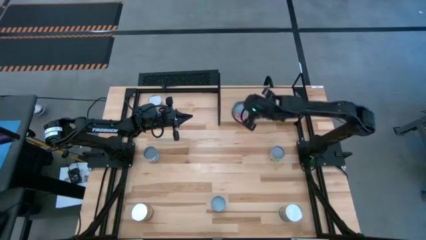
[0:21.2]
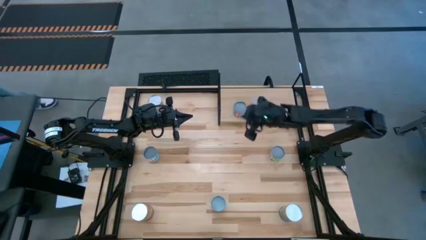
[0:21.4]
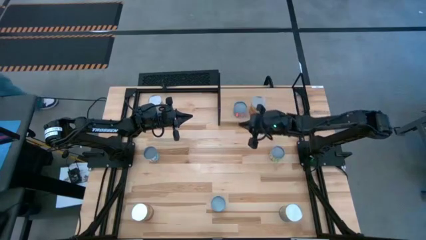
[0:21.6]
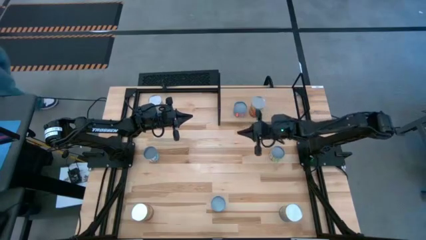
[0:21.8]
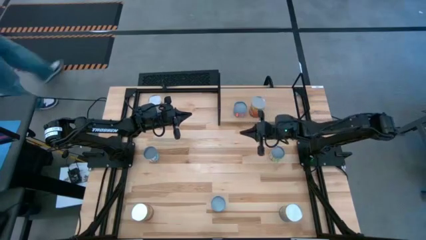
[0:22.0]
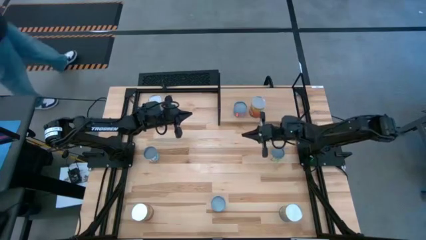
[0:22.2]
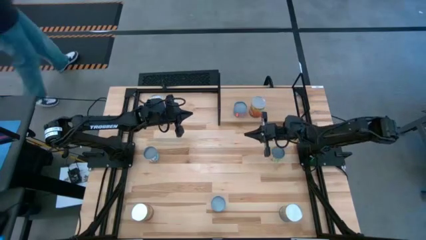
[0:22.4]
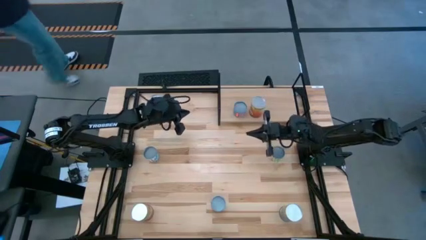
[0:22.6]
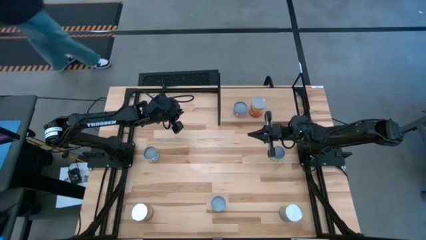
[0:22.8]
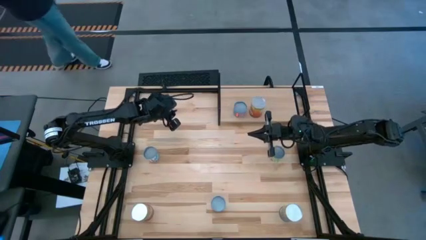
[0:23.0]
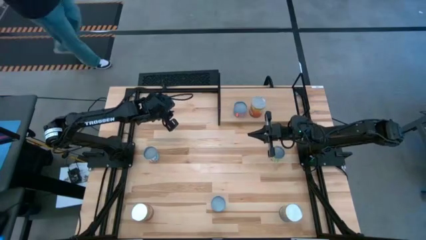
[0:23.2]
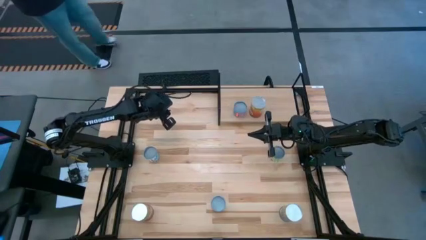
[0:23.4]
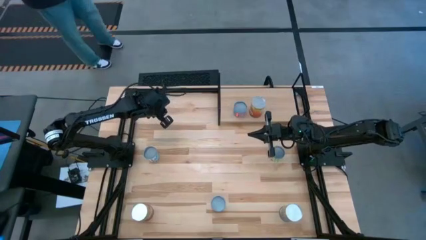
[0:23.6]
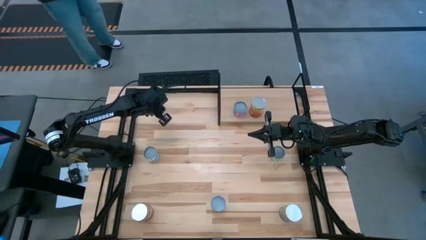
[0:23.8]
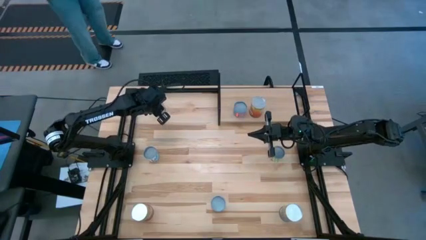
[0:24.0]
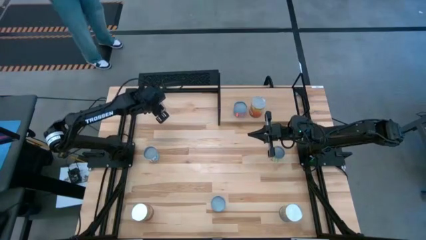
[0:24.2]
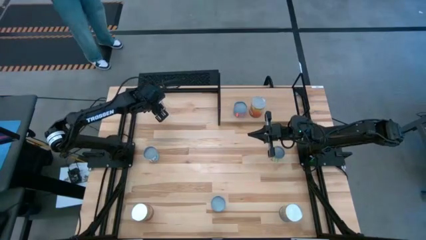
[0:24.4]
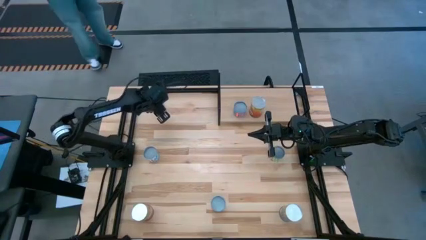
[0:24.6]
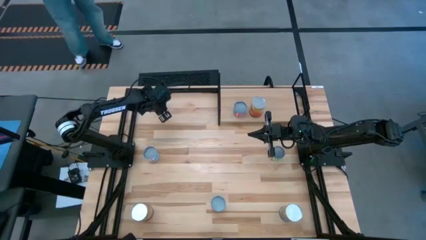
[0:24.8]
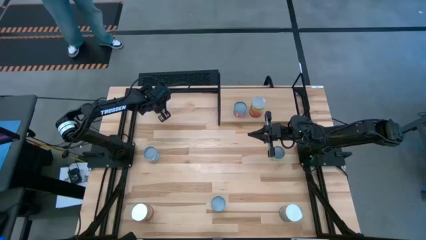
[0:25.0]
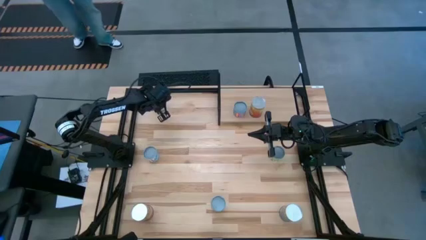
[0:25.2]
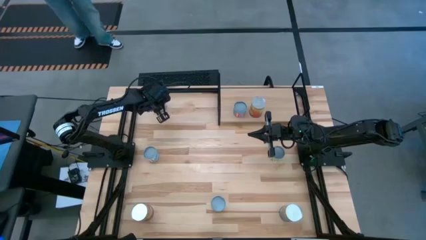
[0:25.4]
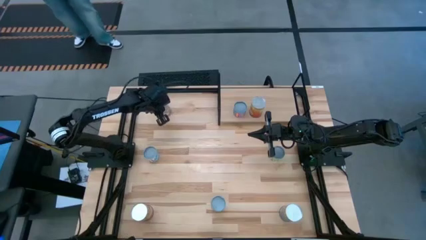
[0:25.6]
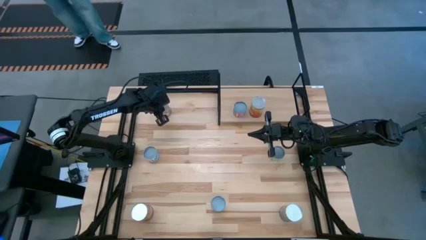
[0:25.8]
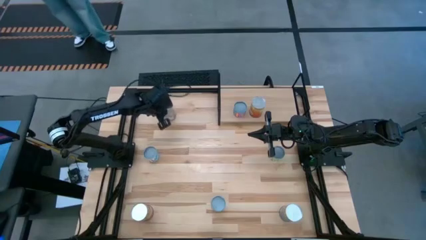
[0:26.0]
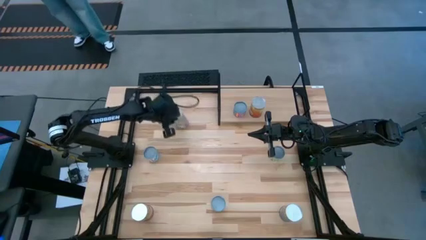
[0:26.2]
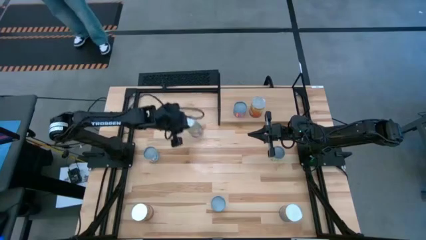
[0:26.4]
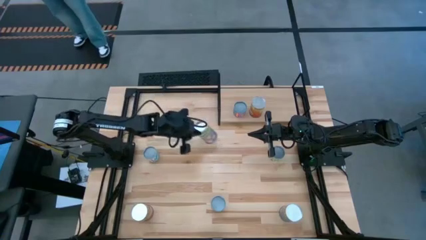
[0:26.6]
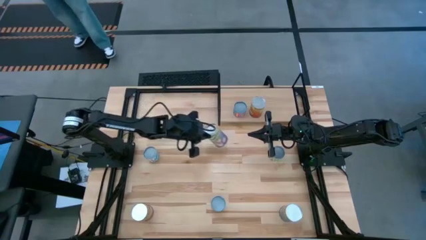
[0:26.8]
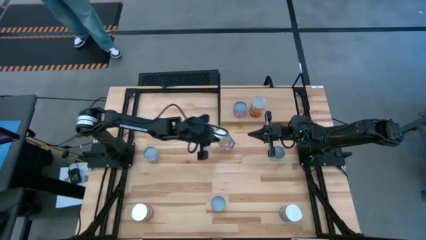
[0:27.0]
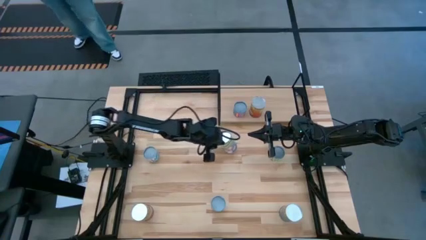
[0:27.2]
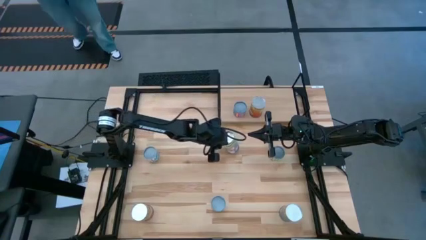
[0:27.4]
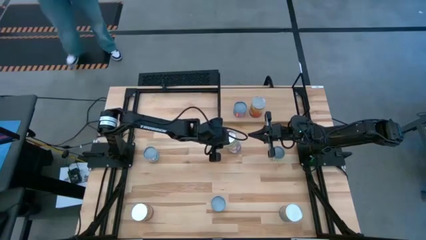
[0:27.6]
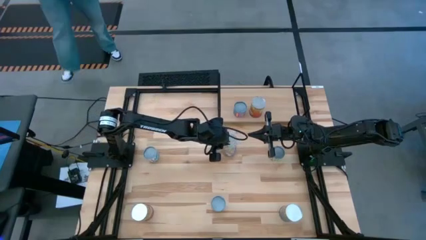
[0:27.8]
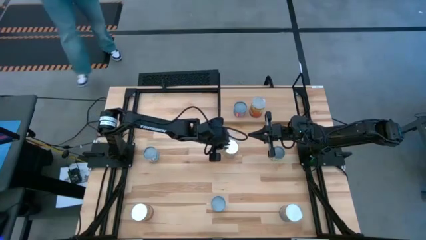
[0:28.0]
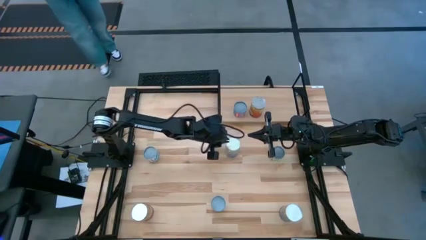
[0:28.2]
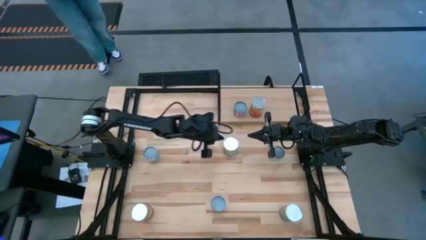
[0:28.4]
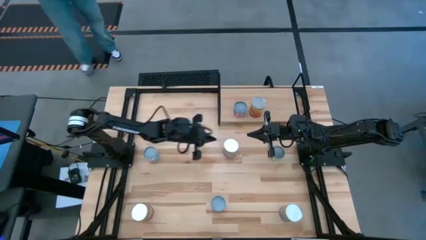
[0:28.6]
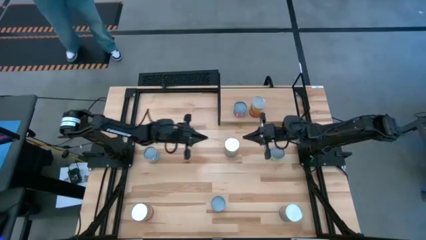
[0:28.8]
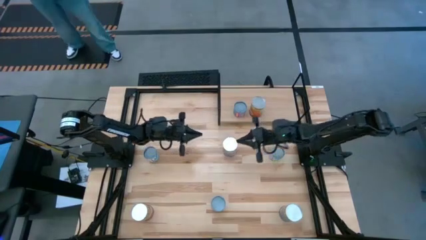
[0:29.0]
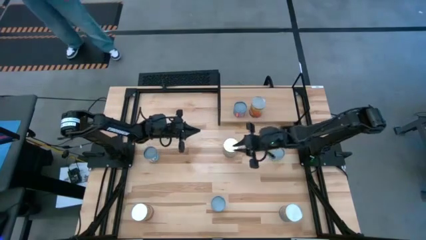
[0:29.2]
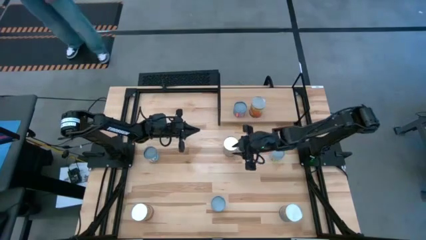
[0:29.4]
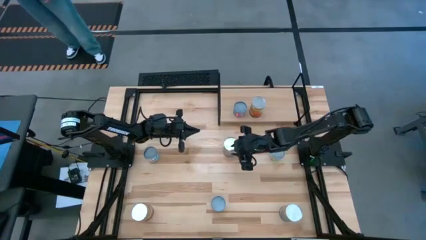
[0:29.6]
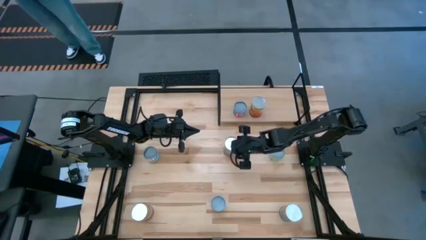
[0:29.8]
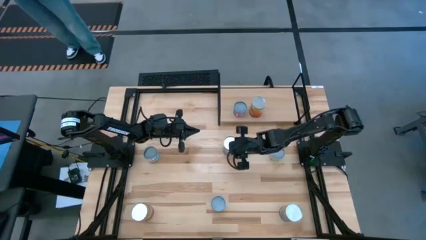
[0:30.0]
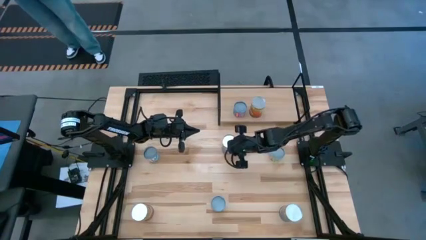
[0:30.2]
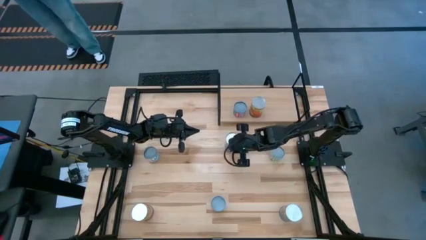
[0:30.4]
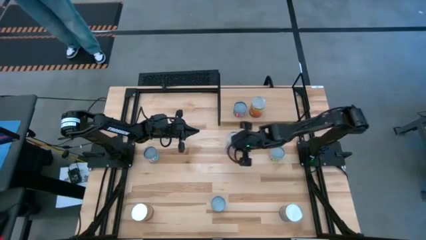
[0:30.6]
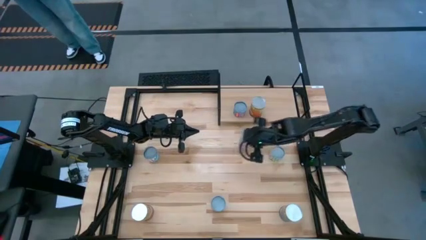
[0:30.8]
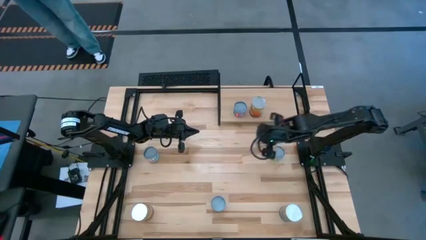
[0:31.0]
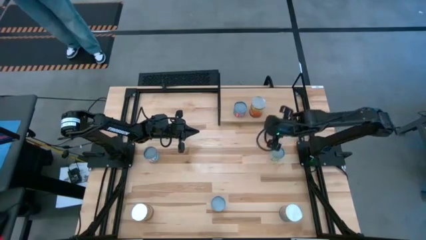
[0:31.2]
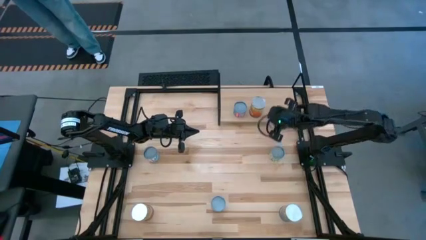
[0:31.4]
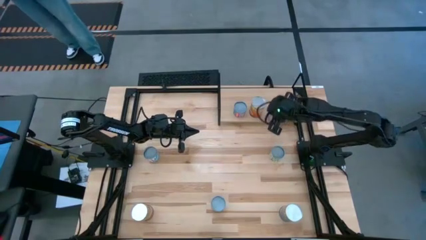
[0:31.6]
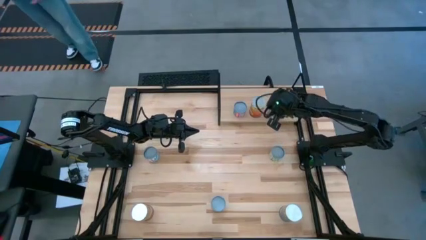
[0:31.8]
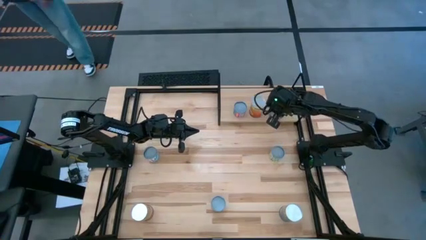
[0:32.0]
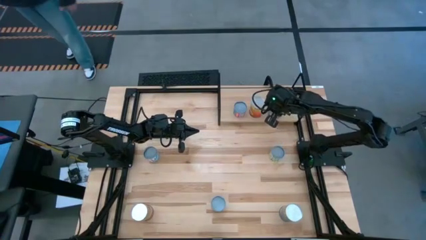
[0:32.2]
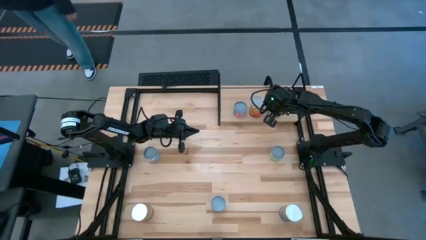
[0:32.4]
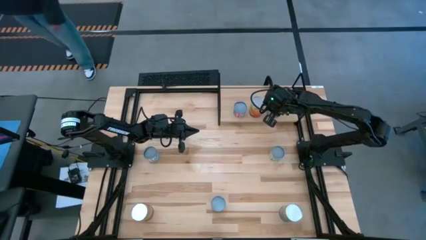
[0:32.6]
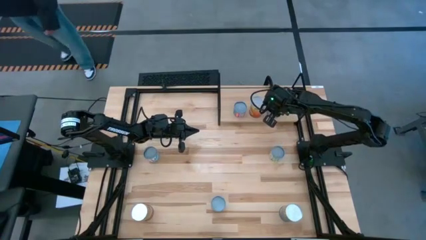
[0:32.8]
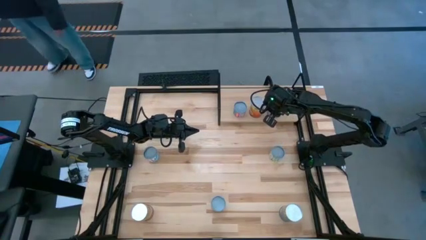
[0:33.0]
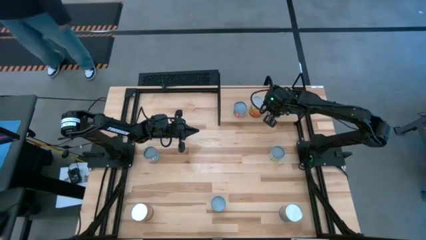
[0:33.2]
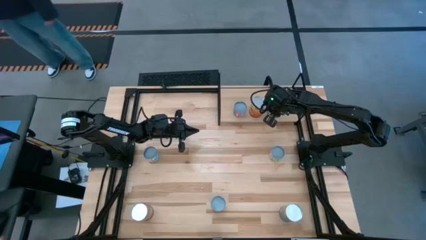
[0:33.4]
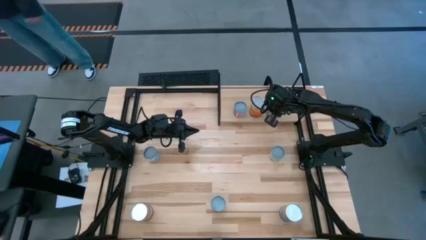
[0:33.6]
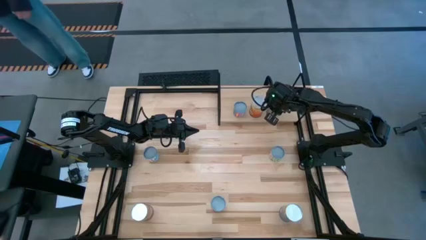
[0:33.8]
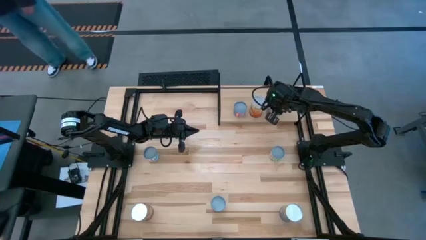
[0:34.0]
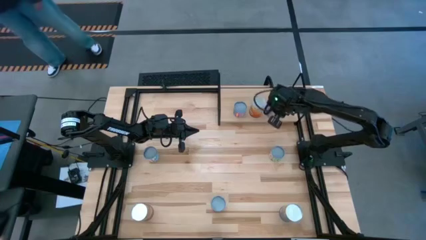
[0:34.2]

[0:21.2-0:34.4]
Task: Pick and place cans onto a shelf
Put the top canned peaches on the shelf

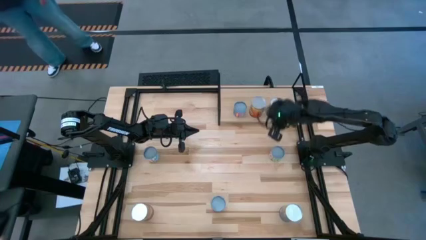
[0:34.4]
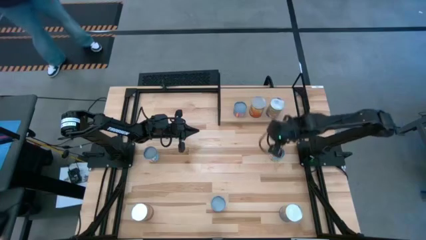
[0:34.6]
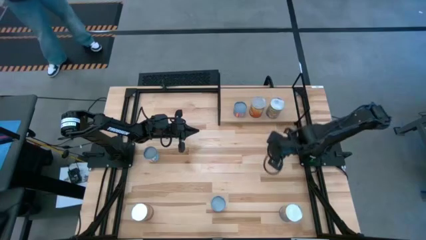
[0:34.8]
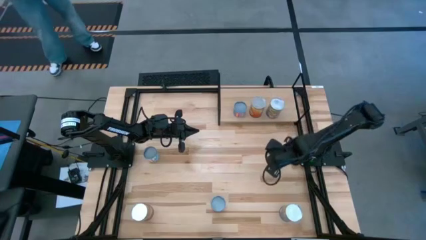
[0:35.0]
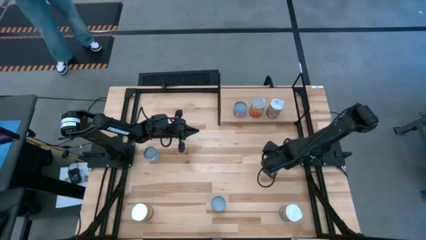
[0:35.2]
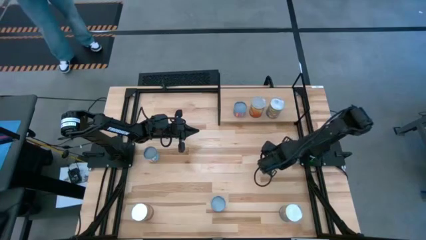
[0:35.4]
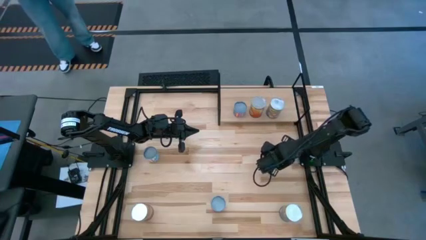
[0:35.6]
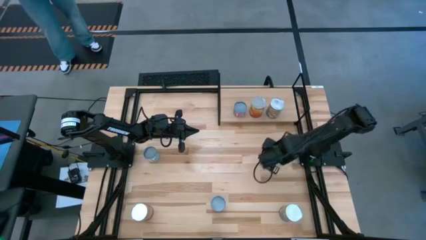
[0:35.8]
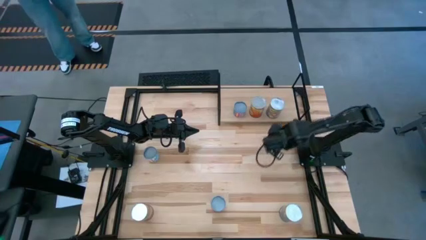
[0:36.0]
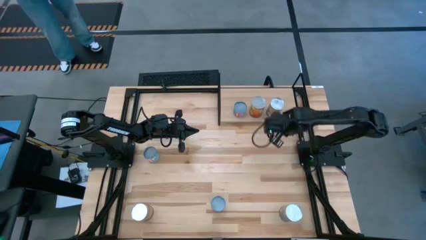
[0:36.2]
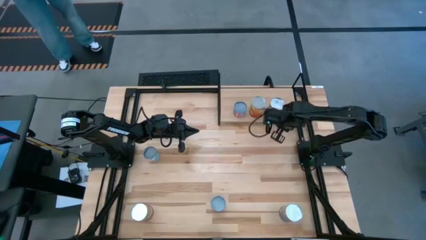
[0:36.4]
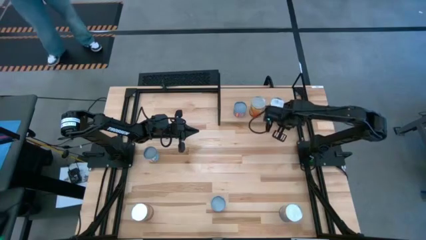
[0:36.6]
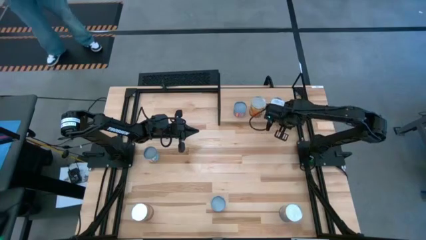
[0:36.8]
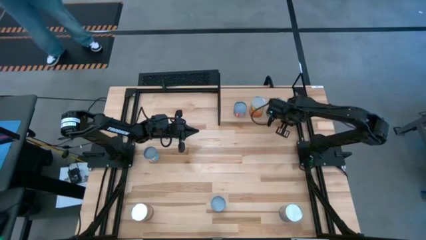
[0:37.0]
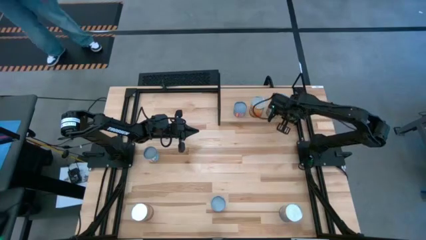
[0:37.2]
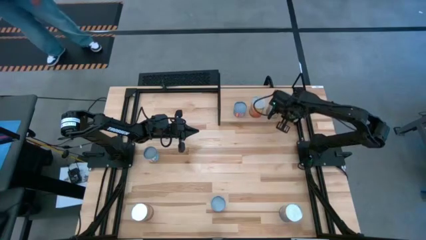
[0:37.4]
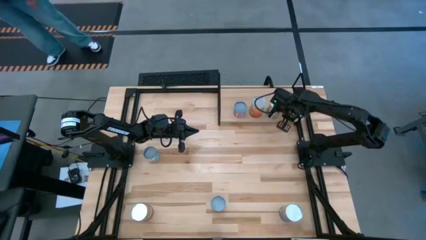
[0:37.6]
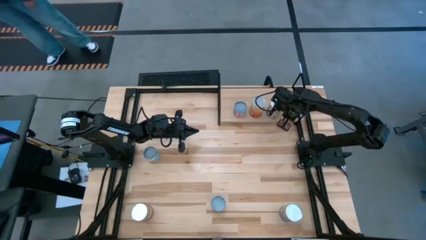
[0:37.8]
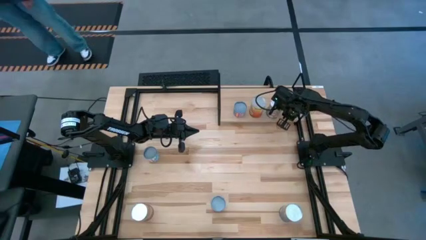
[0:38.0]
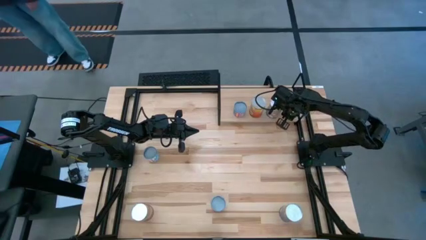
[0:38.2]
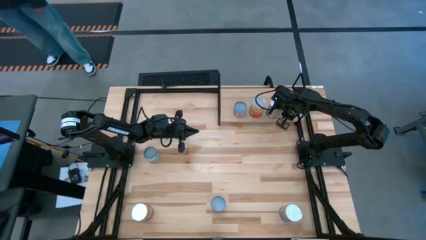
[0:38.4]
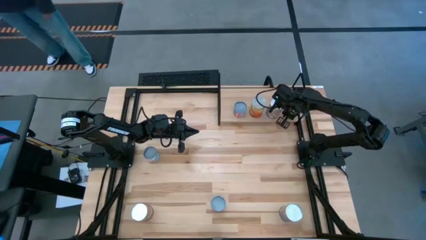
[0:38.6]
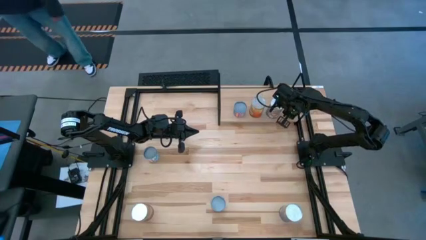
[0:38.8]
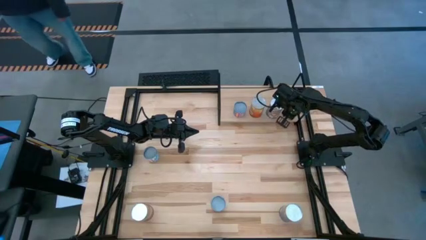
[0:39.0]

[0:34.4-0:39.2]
Put the canned peas on the shelf
